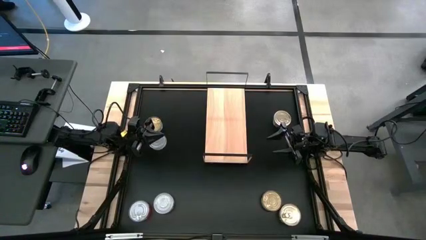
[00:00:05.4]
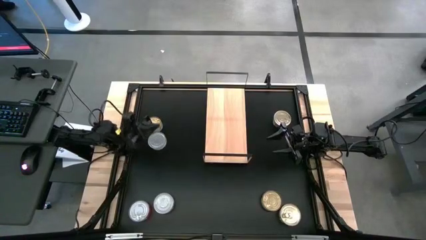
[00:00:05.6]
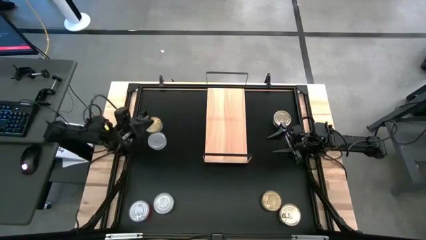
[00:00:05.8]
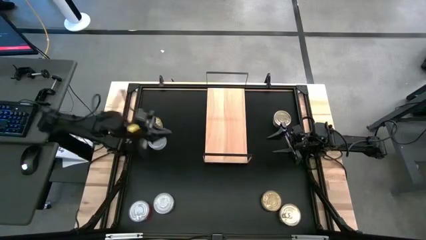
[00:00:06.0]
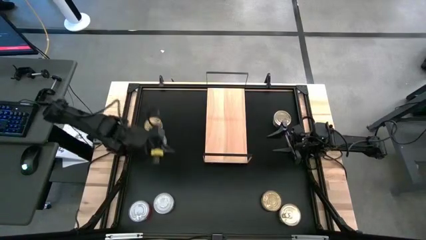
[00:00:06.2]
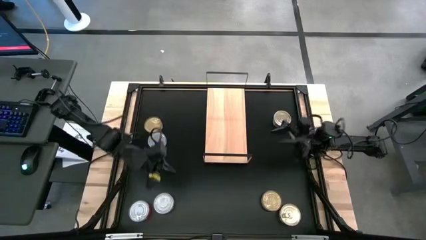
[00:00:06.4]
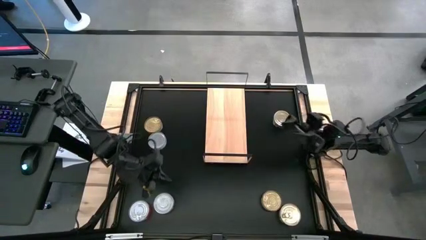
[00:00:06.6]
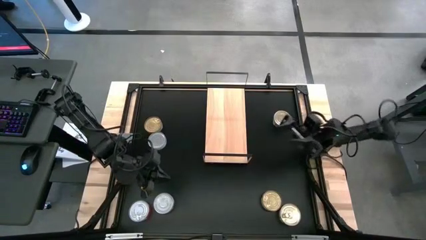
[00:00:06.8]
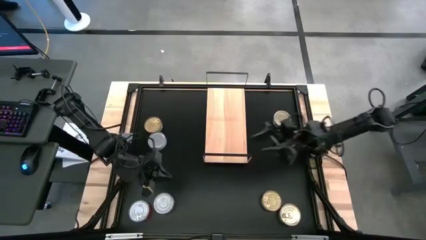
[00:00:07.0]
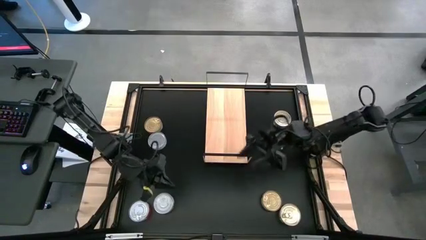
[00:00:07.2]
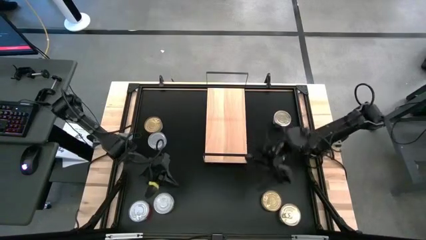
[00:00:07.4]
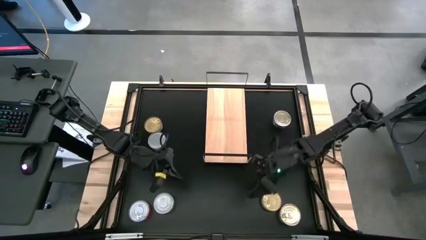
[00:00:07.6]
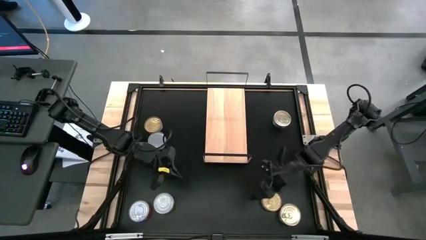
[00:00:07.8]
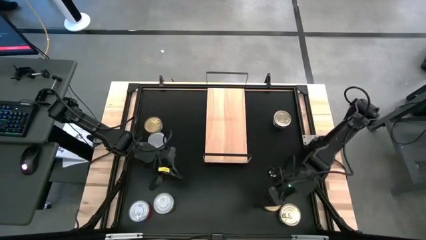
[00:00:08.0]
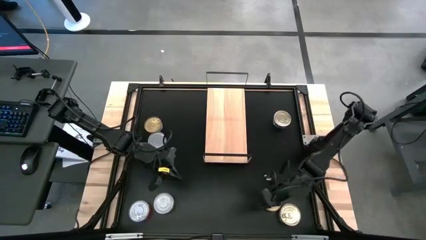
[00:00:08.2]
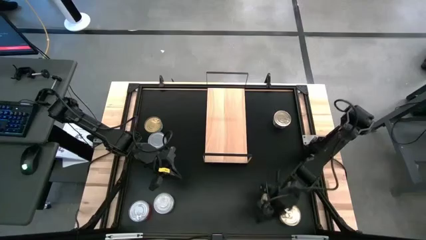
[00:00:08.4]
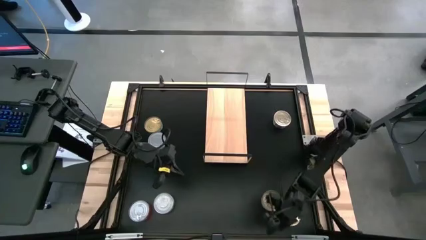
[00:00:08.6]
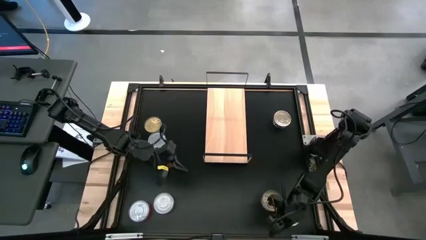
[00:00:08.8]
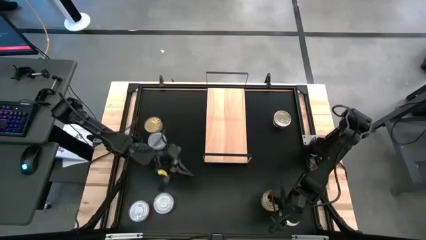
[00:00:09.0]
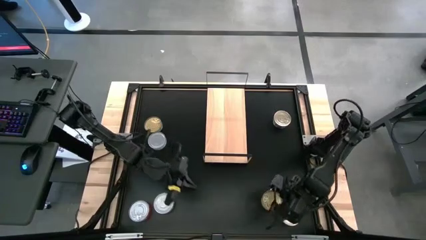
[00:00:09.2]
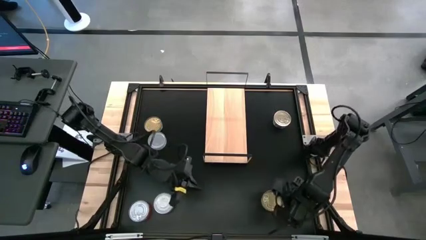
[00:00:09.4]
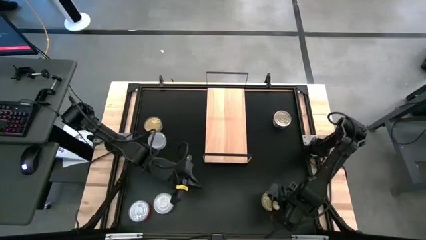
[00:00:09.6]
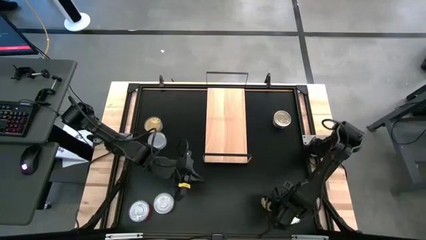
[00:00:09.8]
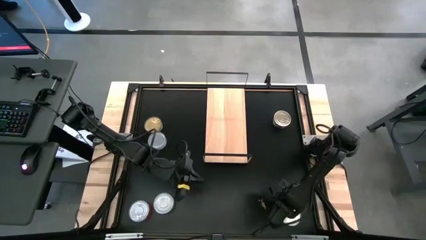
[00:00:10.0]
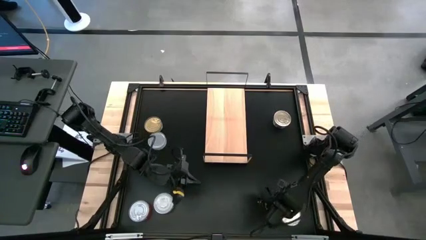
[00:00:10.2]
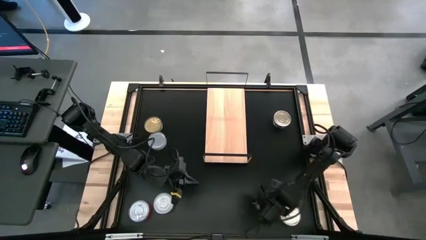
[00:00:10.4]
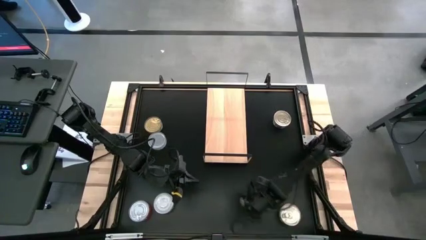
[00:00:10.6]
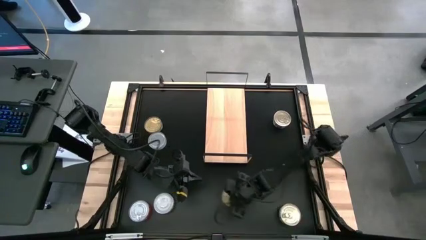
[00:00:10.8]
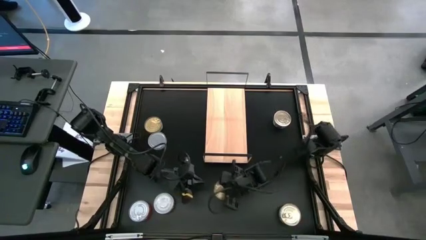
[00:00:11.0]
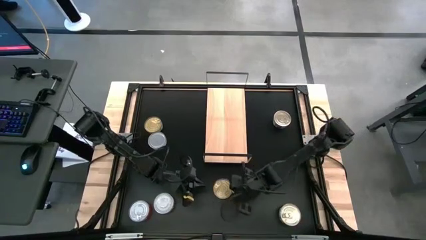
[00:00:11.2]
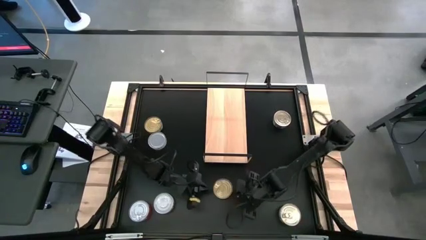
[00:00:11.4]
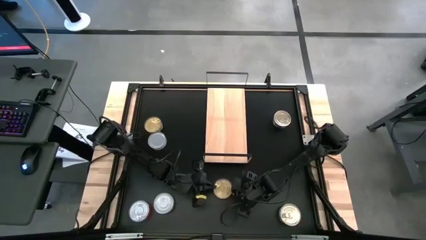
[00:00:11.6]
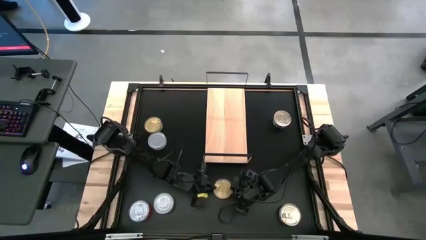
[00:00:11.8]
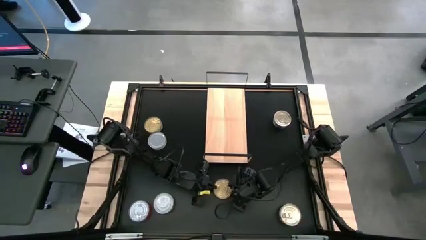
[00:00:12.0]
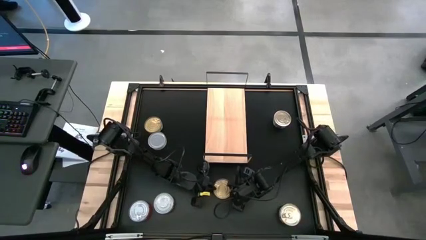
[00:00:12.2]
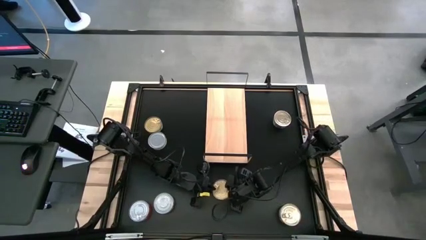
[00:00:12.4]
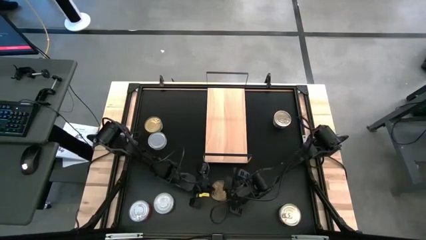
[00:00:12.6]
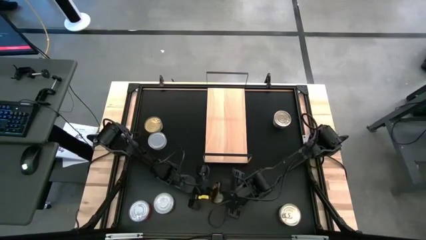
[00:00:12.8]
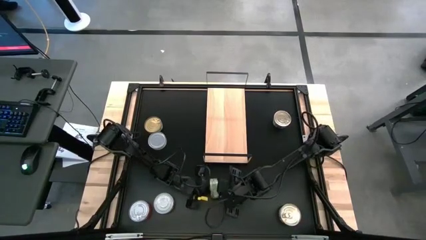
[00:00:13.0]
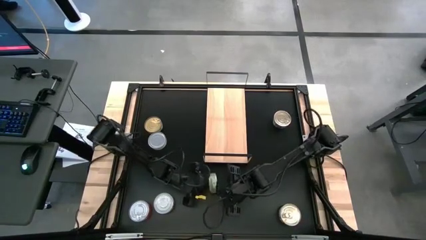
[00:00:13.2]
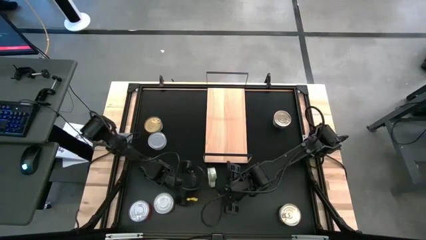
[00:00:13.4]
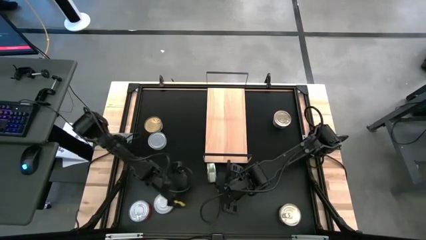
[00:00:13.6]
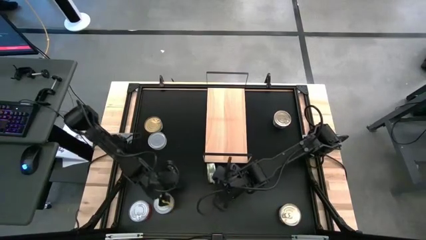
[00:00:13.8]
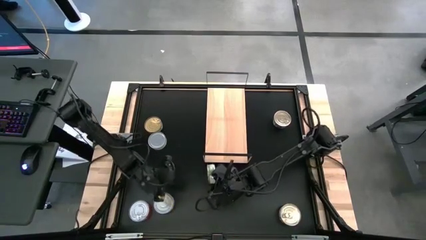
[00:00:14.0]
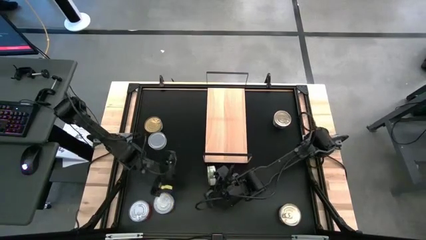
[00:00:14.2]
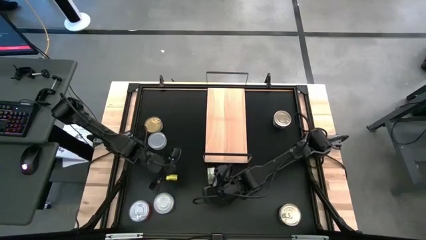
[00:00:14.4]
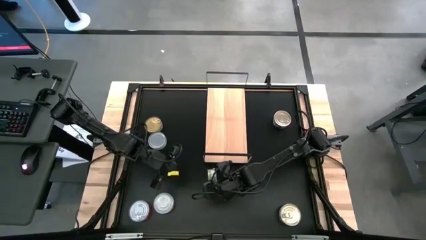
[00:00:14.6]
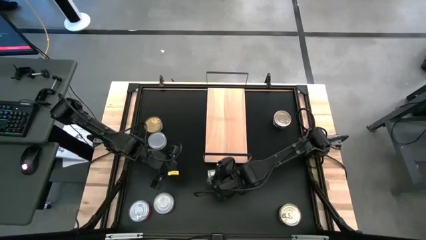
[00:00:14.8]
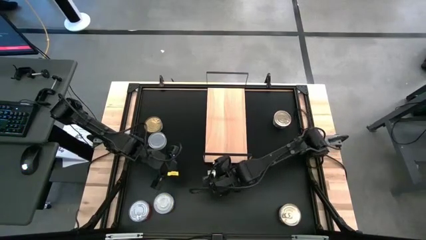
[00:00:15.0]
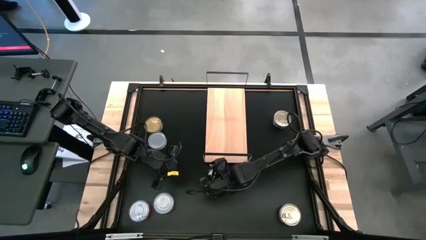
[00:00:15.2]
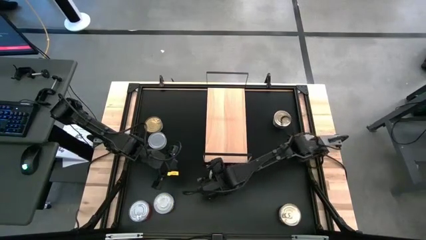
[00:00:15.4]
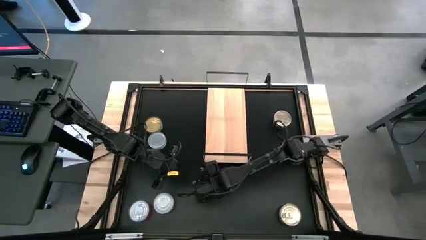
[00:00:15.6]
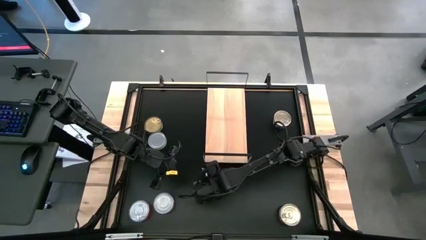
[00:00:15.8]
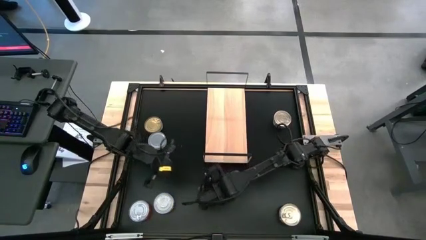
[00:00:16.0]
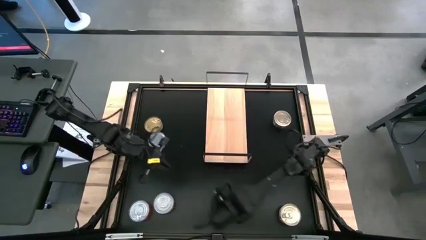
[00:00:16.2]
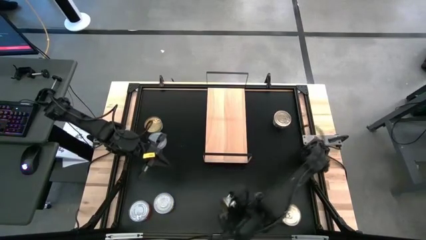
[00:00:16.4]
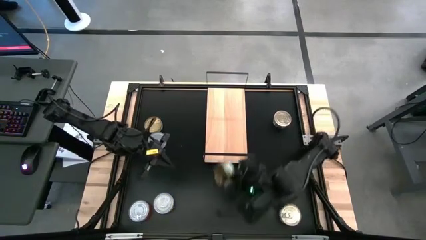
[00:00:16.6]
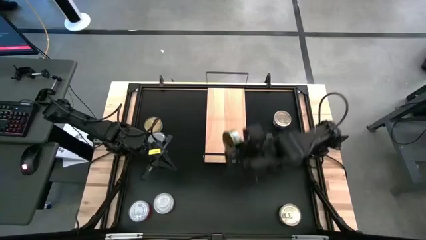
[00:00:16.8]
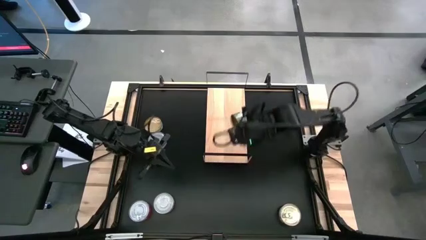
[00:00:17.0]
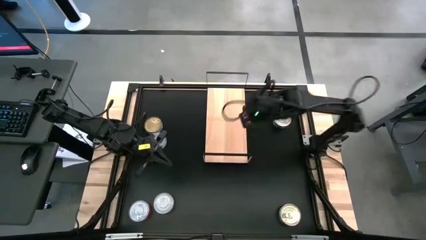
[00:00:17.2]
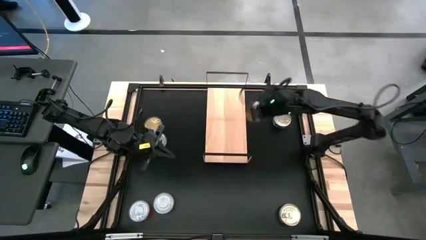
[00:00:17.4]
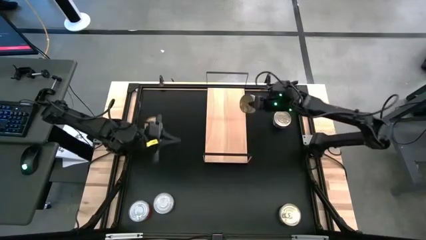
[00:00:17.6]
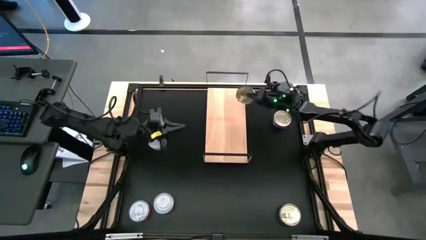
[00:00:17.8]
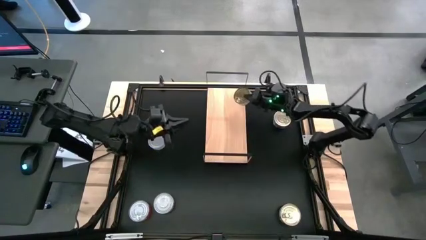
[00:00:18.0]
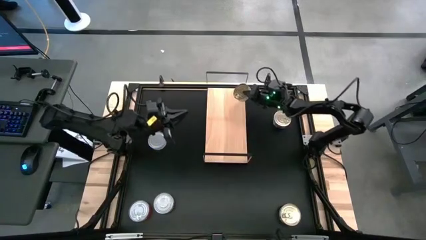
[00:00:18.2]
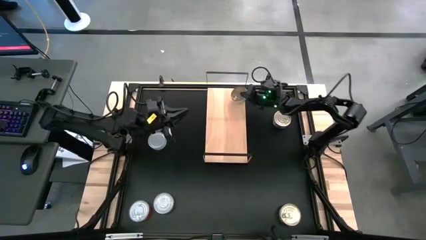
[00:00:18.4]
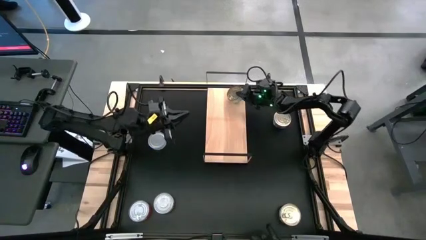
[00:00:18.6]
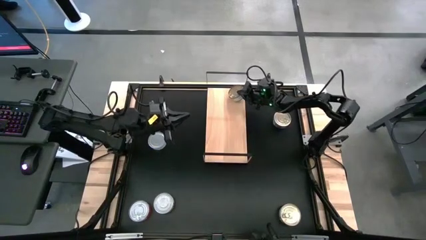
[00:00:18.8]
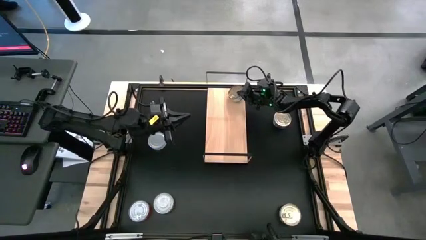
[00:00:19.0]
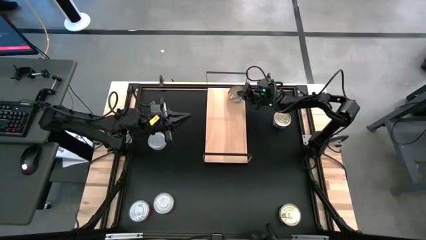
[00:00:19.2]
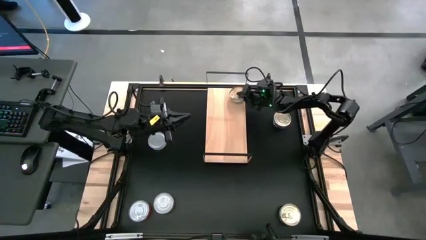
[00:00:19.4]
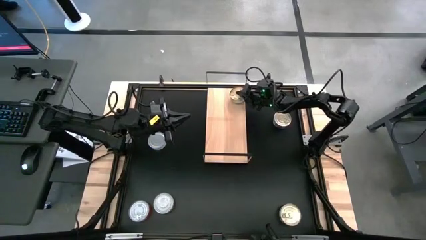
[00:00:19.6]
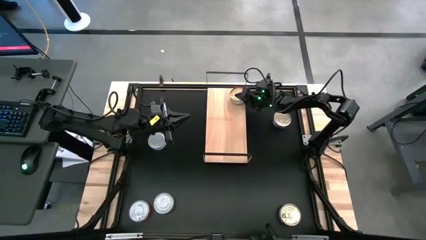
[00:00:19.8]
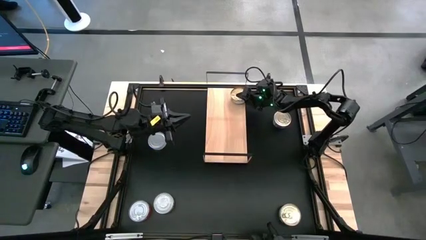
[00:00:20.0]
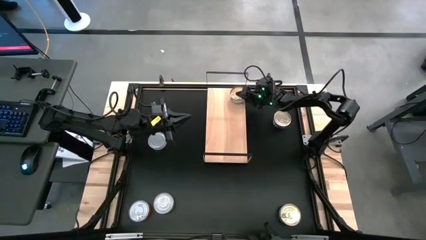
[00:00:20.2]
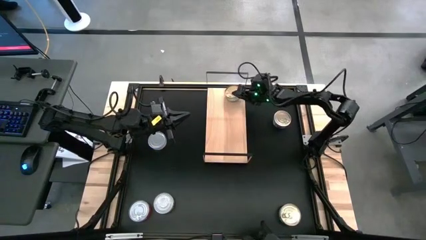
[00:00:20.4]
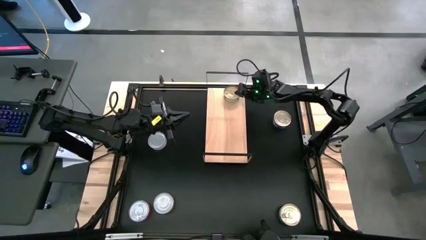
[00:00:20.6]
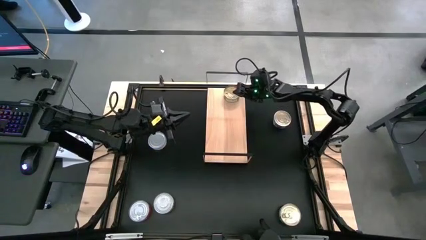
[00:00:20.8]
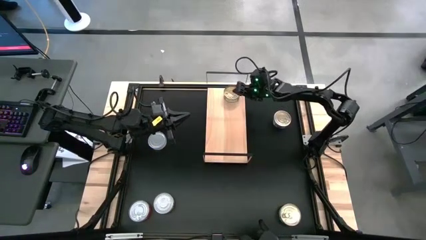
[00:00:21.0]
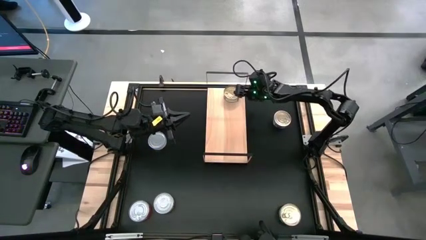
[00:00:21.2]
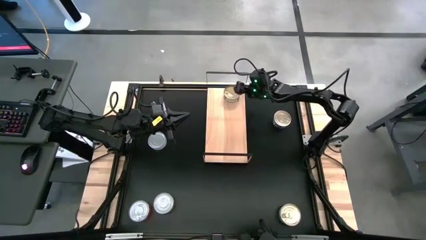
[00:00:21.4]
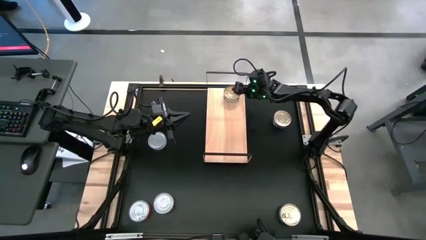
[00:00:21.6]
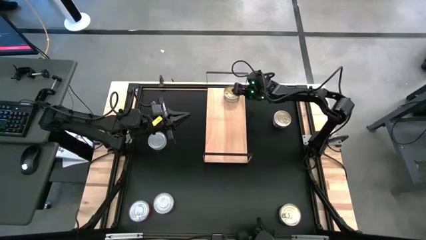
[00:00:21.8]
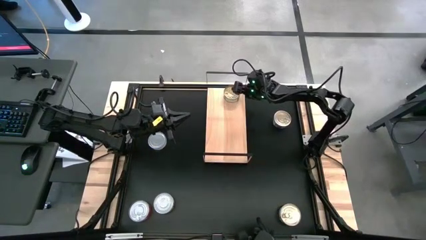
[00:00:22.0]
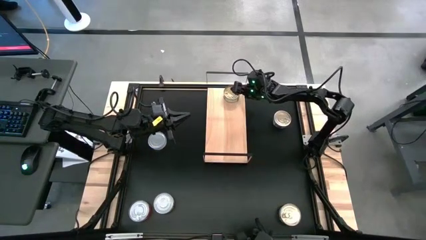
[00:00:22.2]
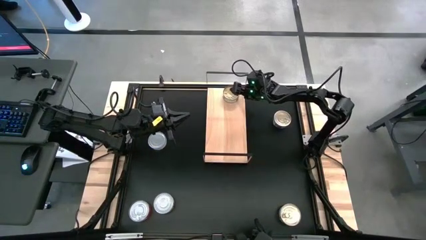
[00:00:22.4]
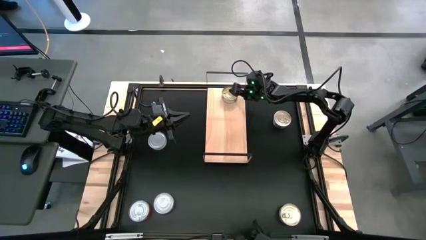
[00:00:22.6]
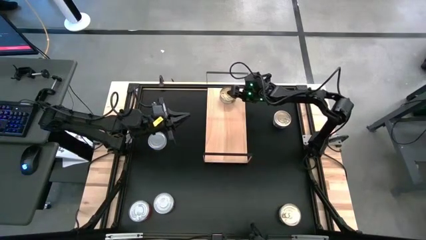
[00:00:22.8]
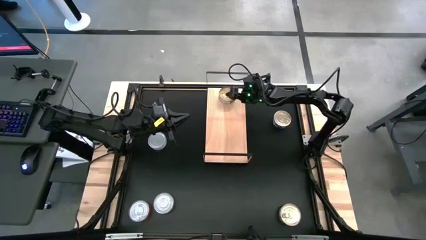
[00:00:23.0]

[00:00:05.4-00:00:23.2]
Task: Stack canned seafood by type on shelf
Put the green tuna can on the shelf
